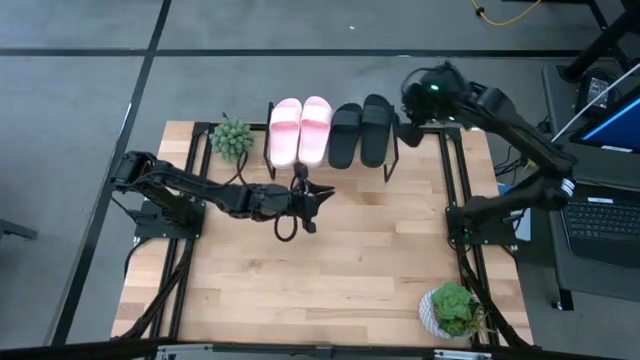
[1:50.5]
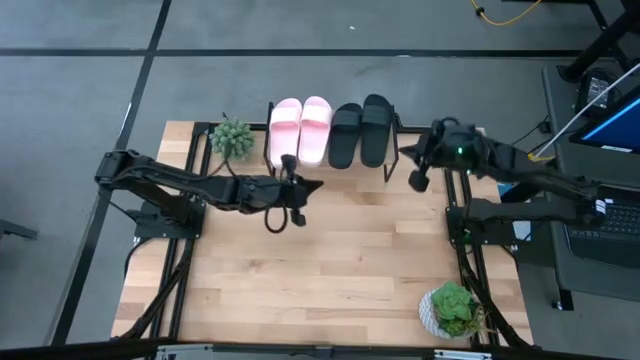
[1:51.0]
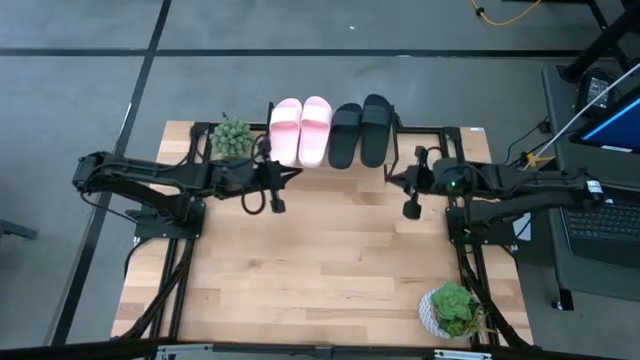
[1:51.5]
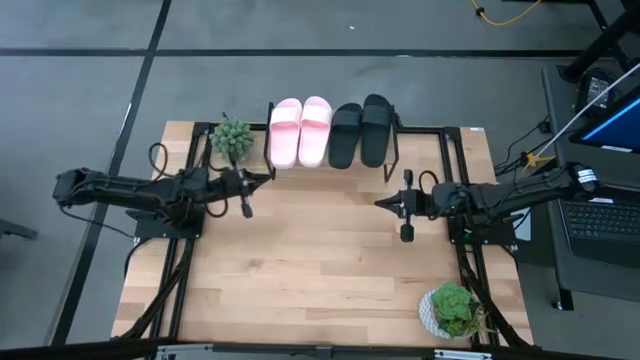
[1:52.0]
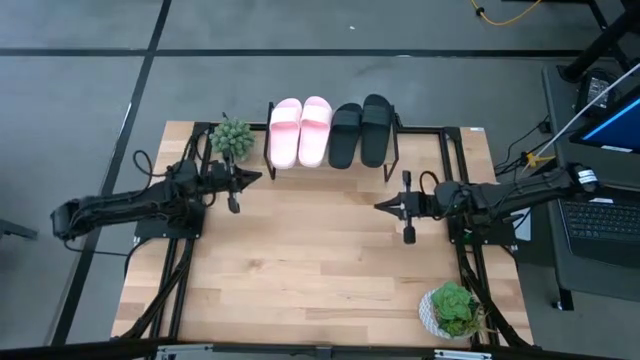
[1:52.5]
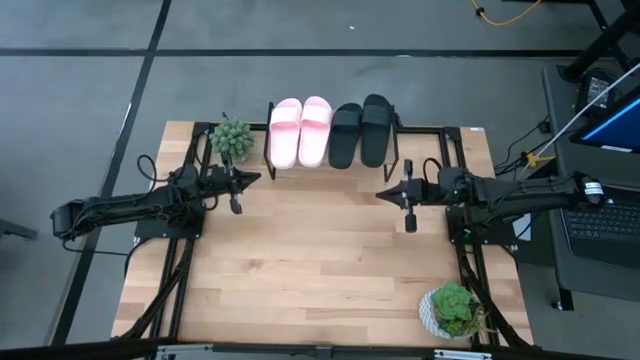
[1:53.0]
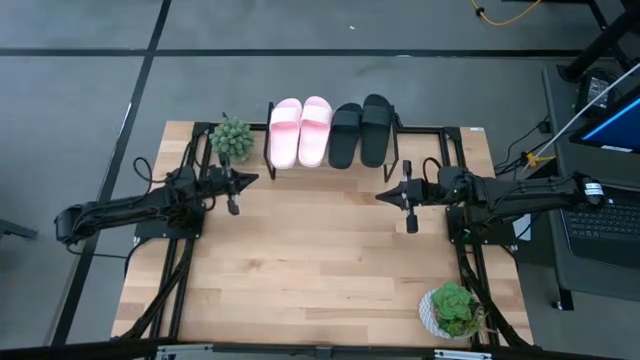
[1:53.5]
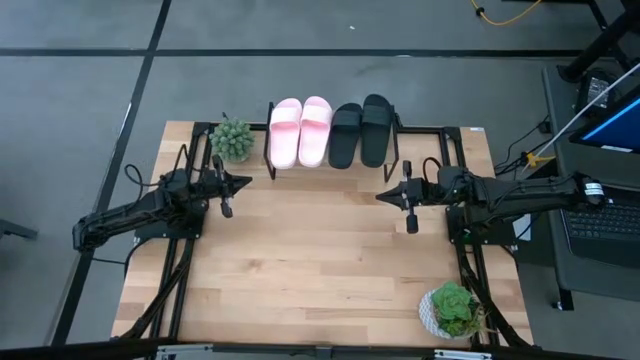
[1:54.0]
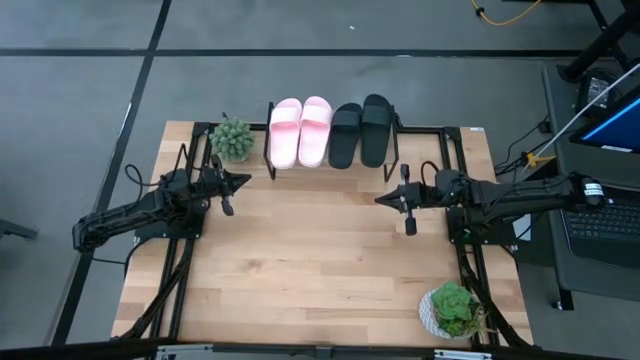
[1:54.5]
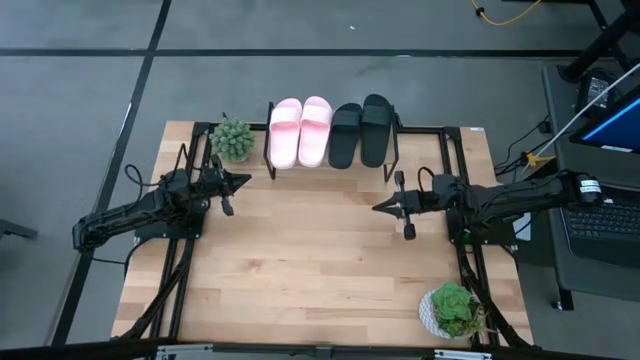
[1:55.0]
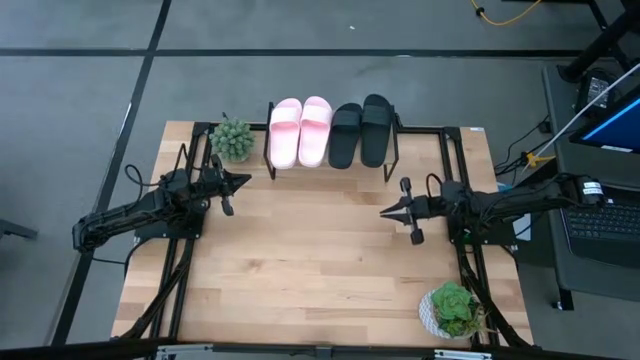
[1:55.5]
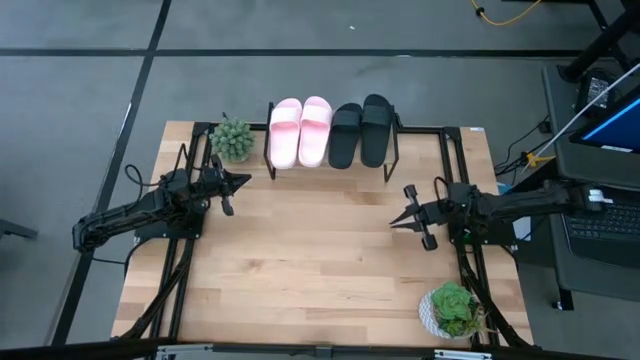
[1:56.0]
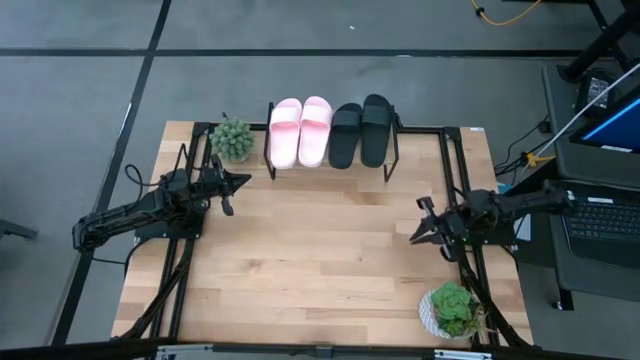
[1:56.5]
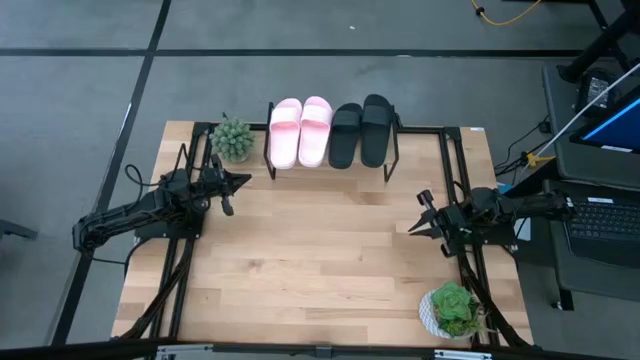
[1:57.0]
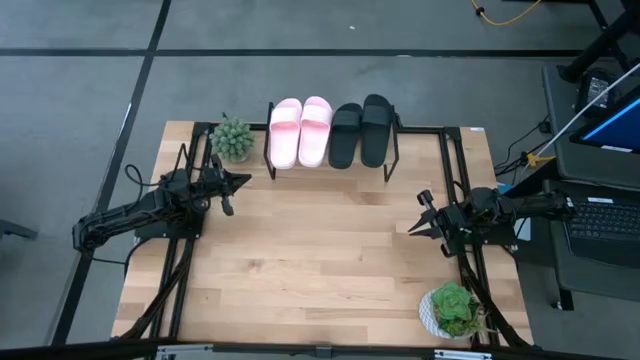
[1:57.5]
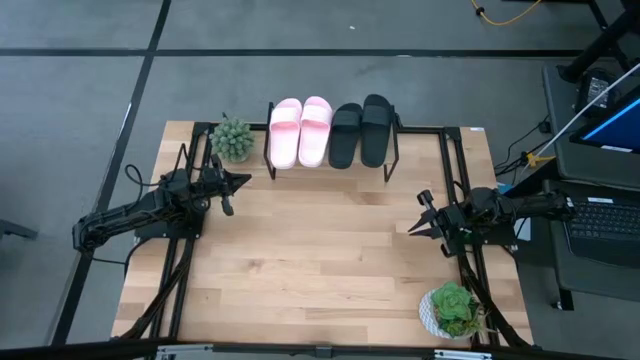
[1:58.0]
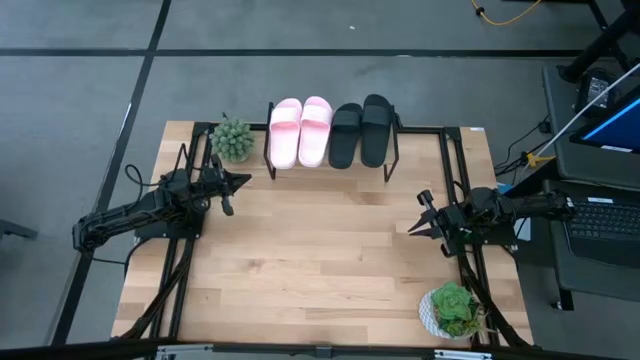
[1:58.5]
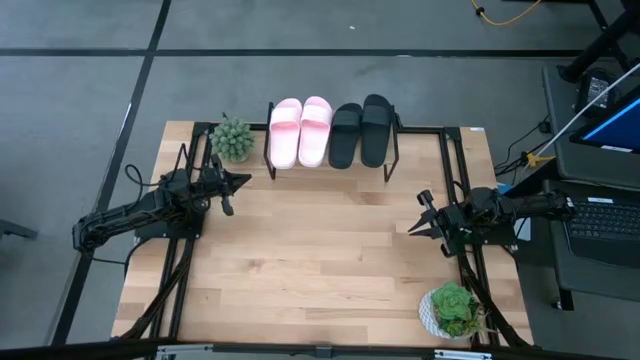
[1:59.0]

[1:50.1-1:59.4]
Task: Pick and place slides into the shelf
Return to Home Position

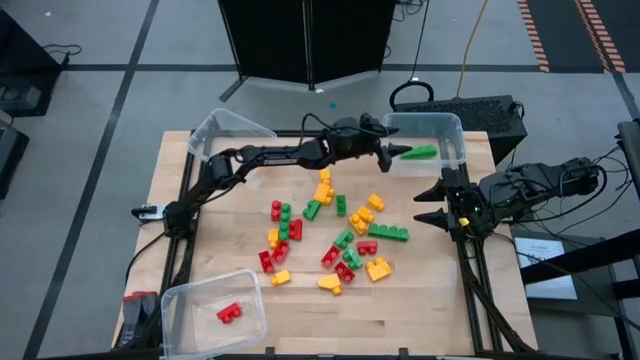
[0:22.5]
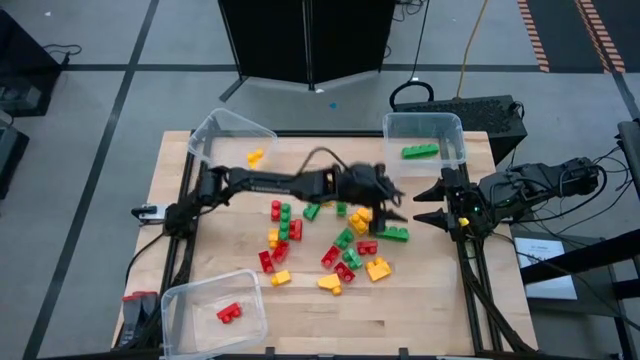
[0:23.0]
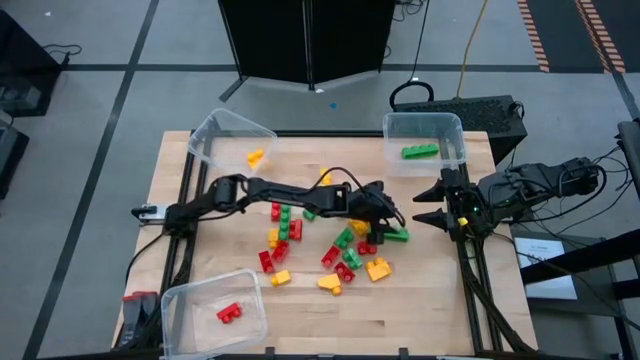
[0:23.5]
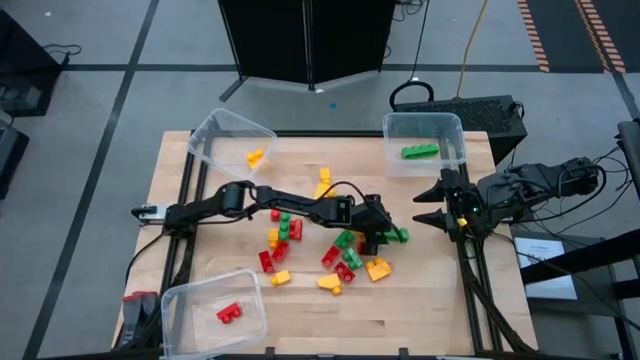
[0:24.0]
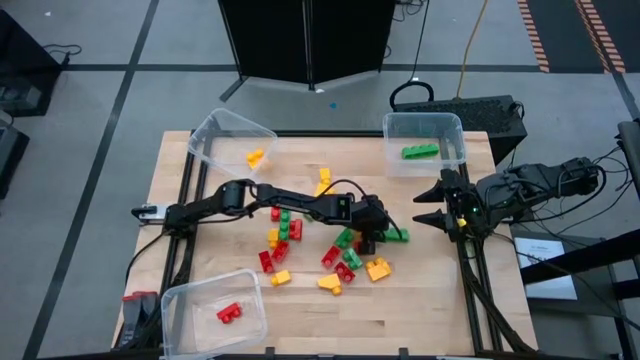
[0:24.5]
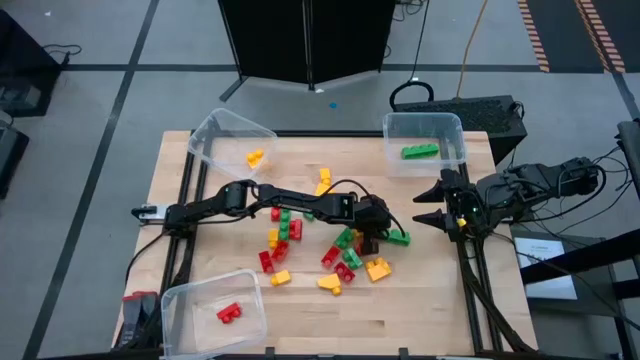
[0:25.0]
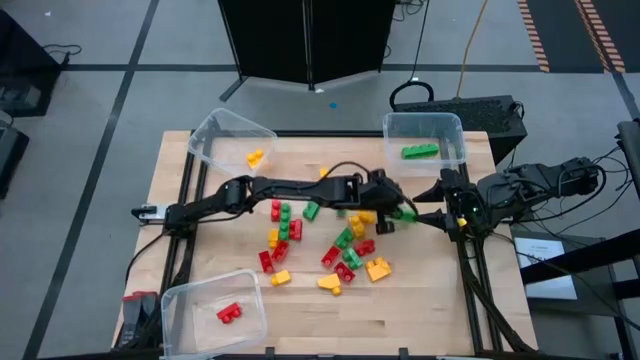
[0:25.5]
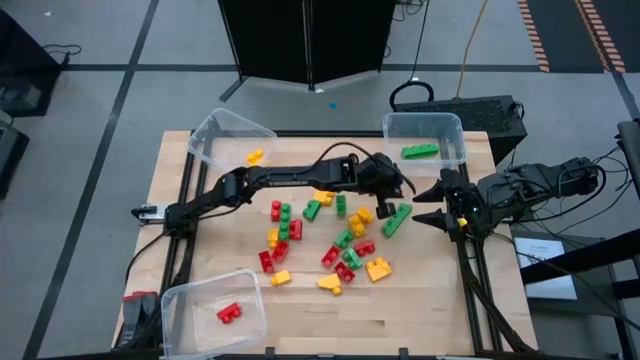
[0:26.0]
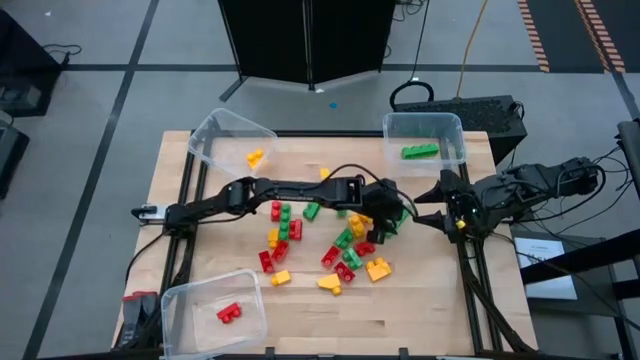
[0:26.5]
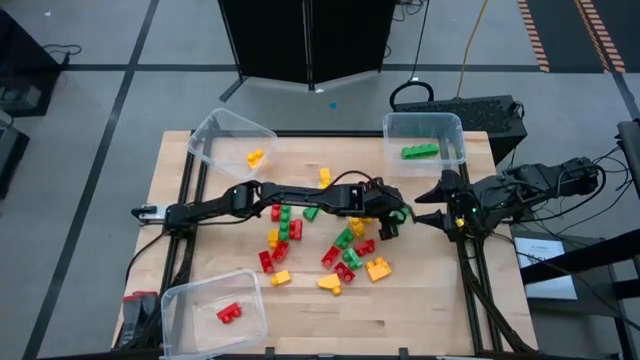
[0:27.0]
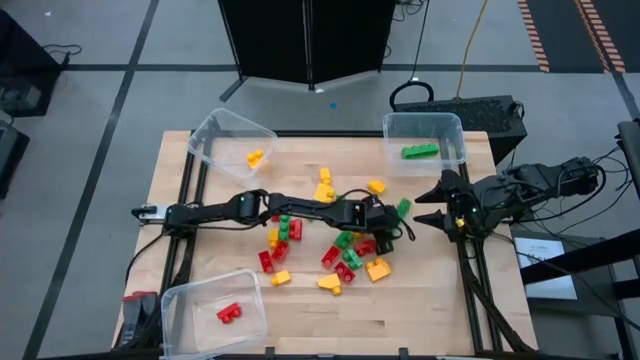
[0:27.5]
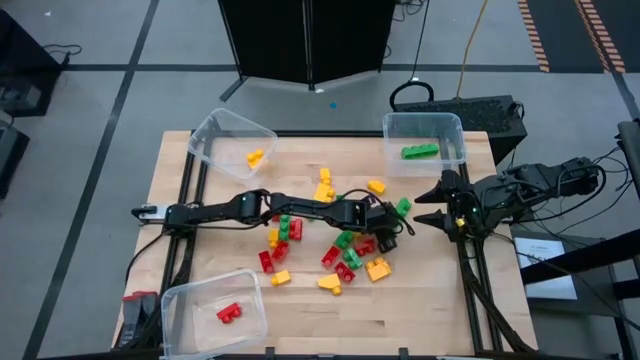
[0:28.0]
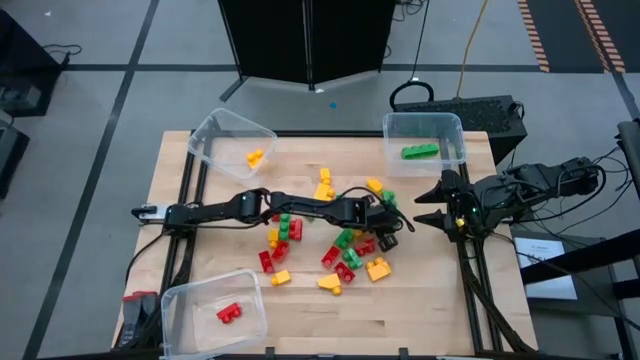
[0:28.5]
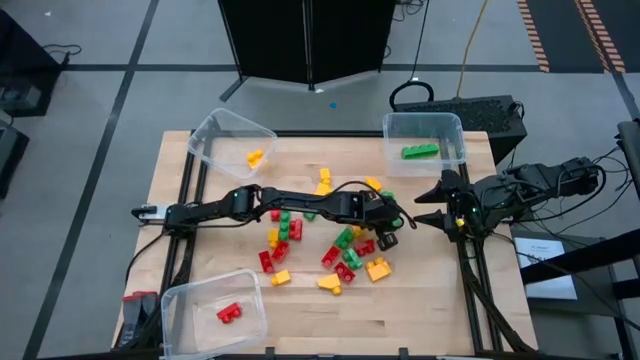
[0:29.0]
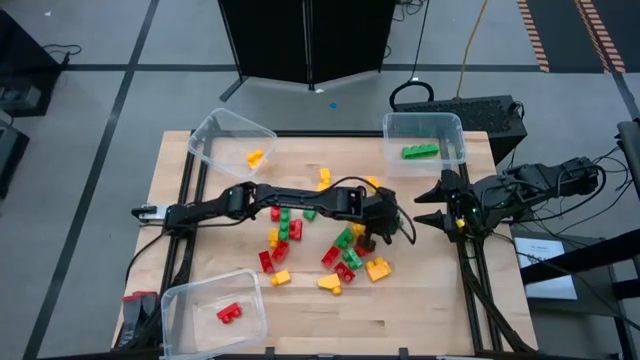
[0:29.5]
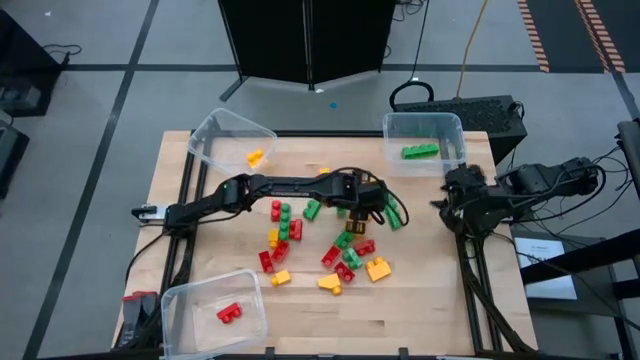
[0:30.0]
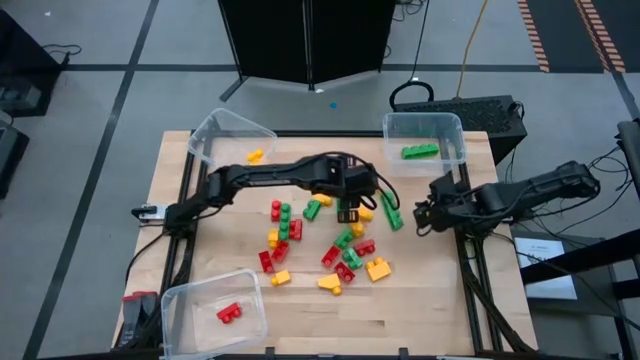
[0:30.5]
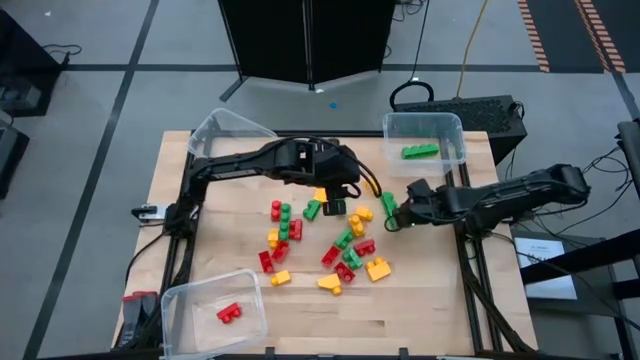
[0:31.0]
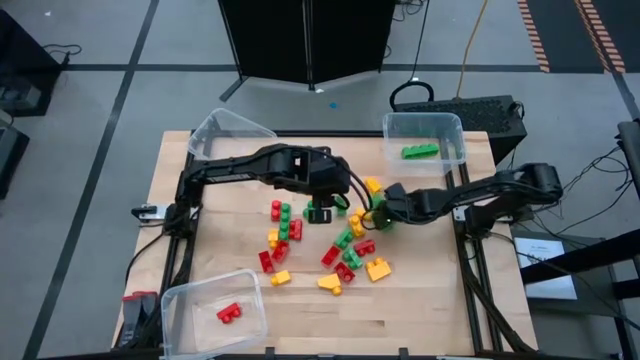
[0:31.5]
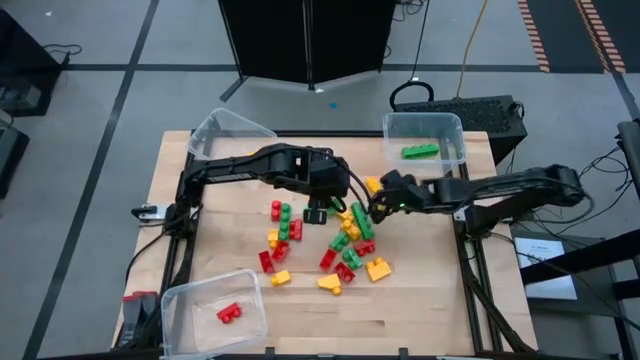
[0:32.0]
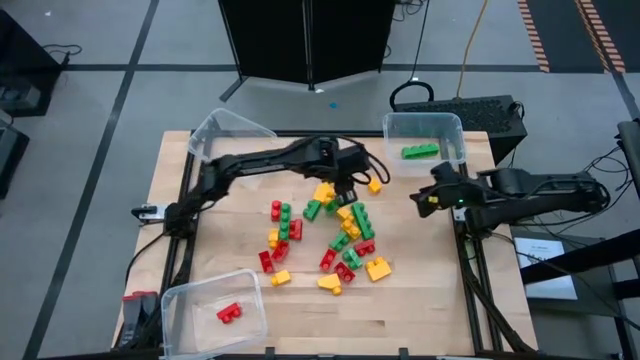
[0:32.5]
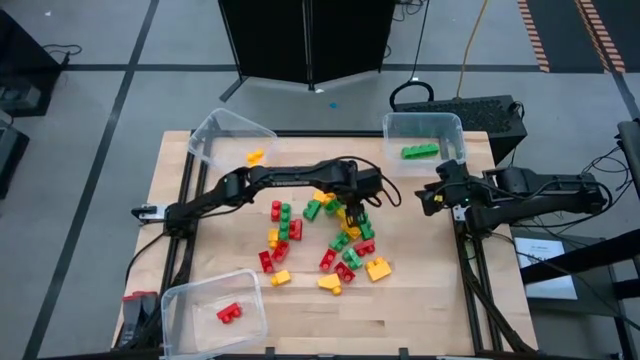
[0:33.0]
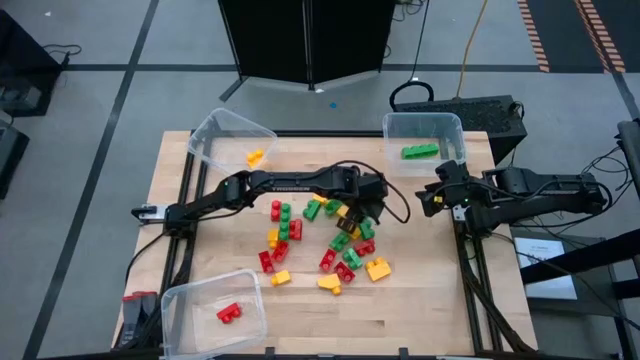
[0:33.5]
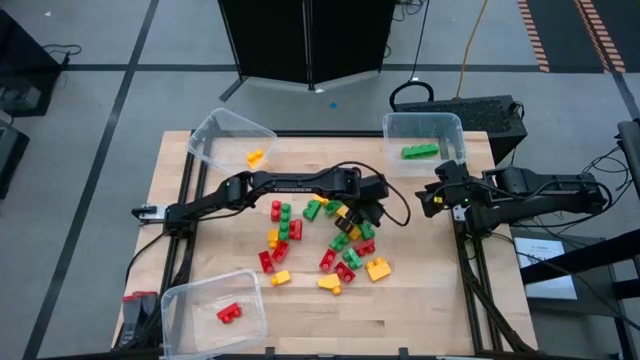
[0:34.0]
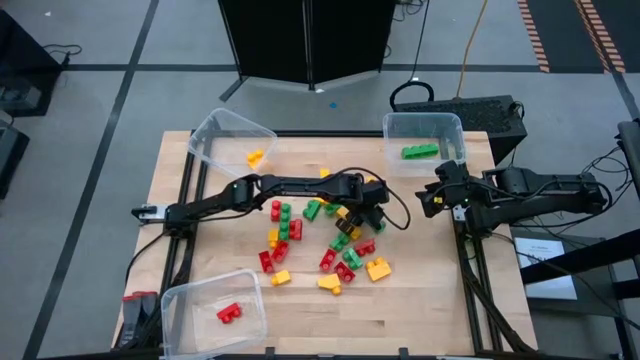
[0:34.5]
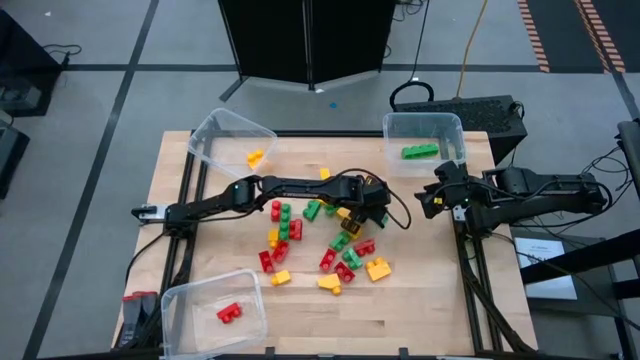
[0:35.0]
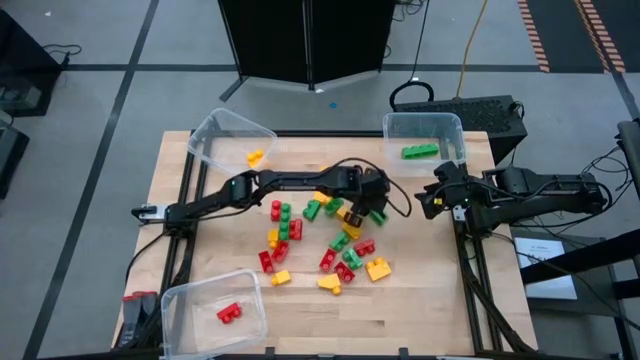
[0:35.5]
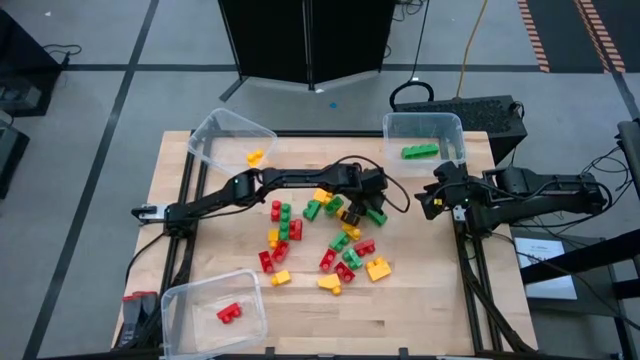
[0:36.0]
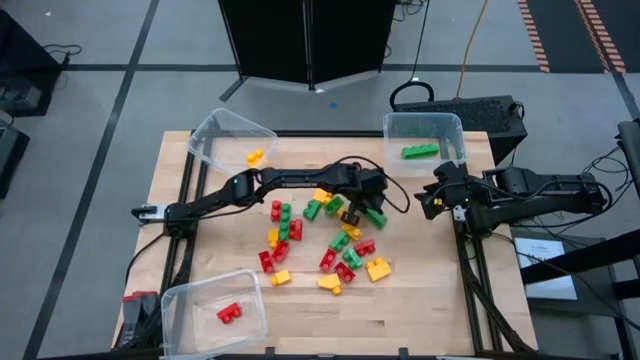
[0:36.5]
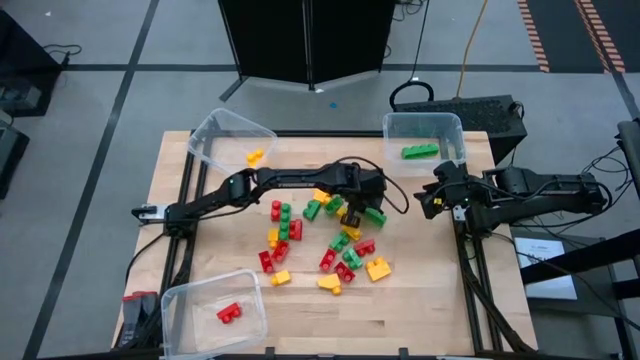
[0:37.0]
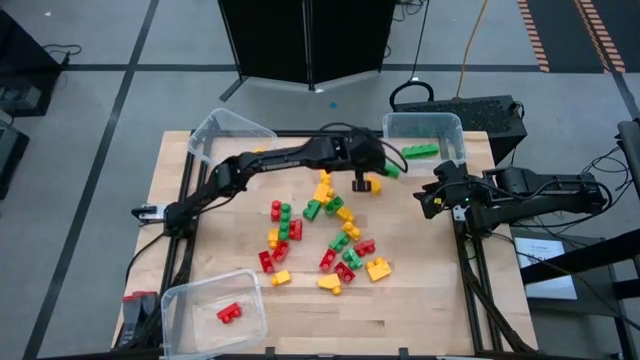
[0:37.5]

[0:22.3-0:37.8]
Task: Sort blocks
Put the green game piece into the top right transparent bin
